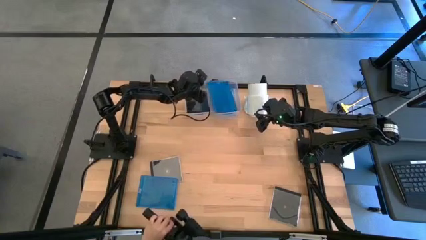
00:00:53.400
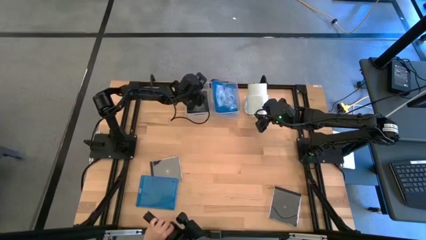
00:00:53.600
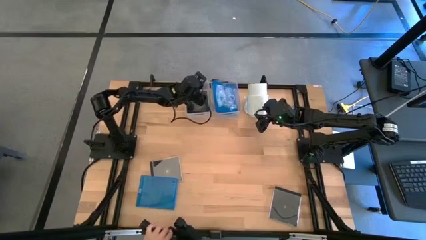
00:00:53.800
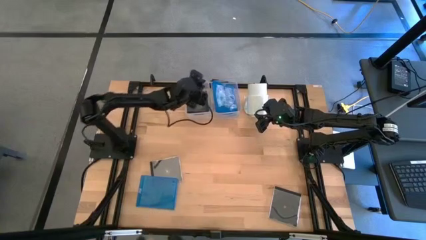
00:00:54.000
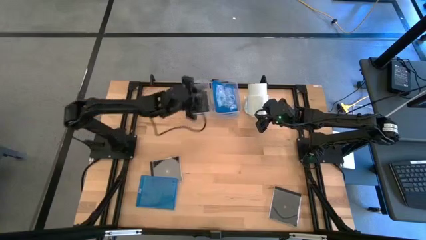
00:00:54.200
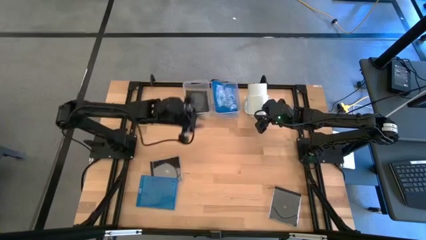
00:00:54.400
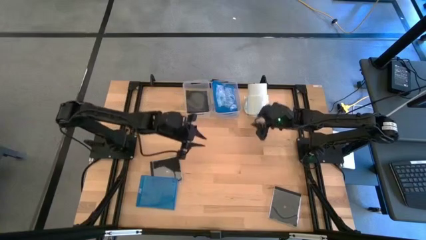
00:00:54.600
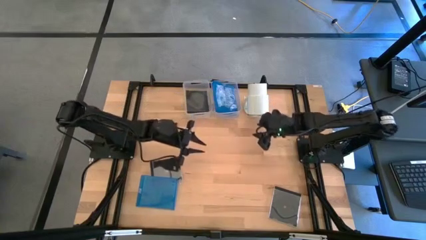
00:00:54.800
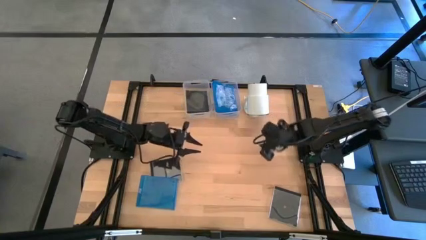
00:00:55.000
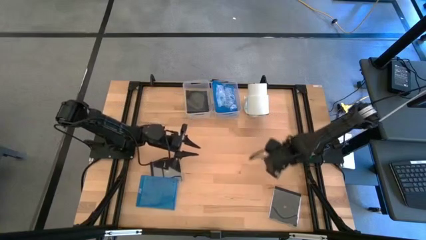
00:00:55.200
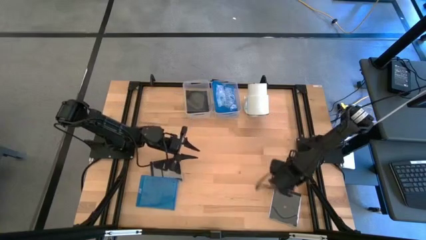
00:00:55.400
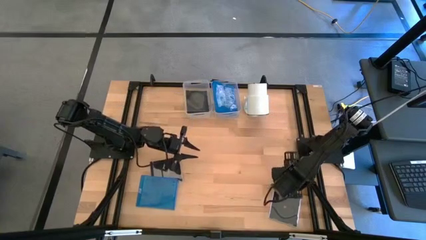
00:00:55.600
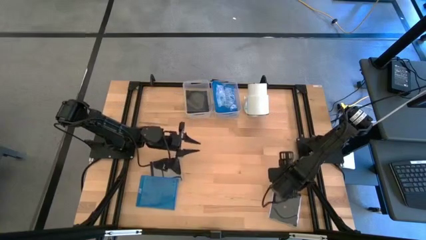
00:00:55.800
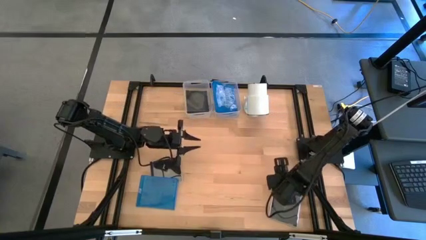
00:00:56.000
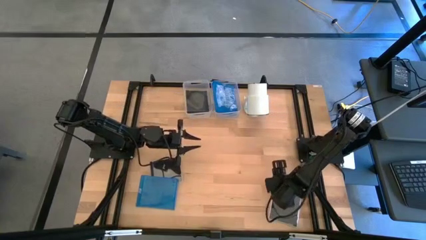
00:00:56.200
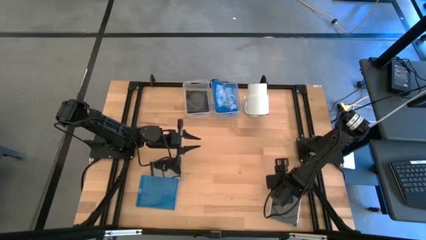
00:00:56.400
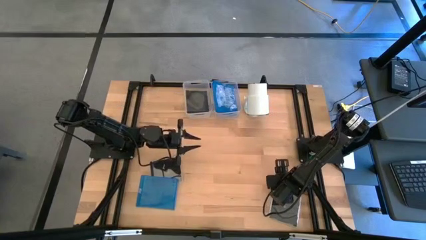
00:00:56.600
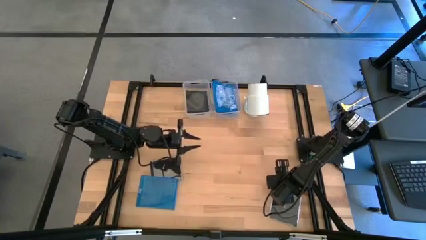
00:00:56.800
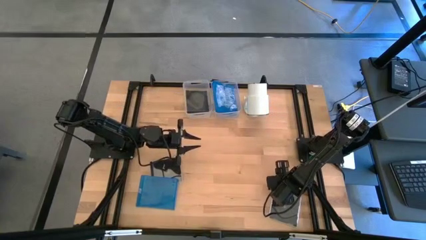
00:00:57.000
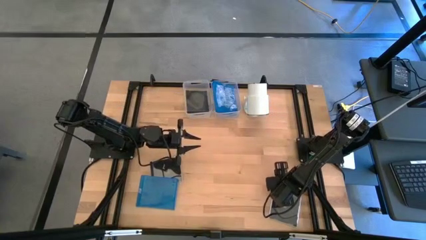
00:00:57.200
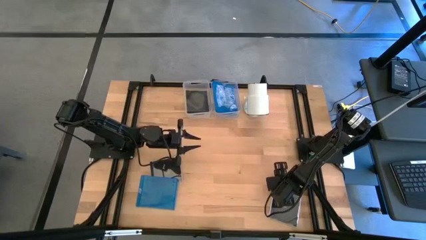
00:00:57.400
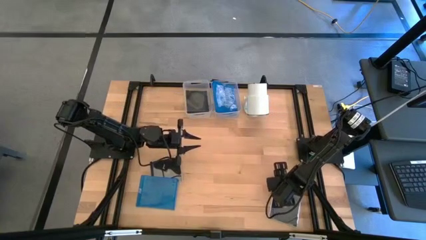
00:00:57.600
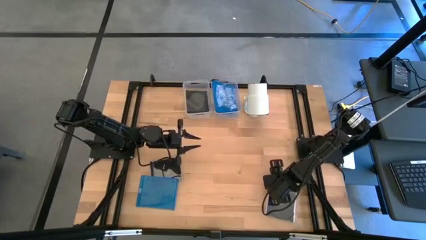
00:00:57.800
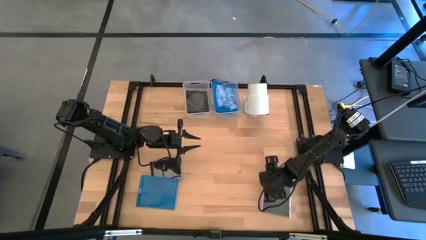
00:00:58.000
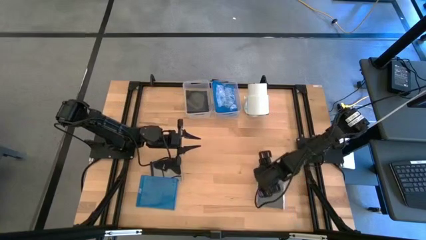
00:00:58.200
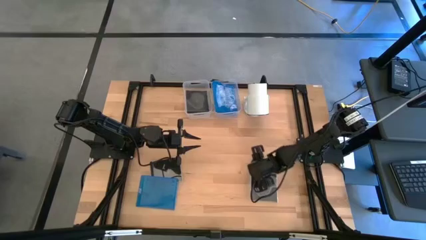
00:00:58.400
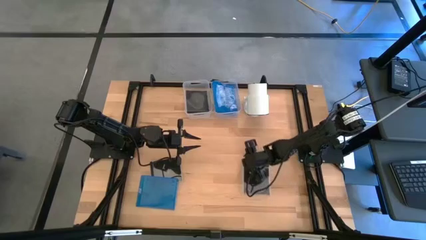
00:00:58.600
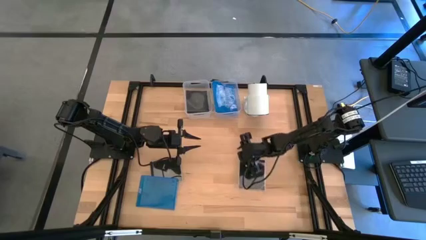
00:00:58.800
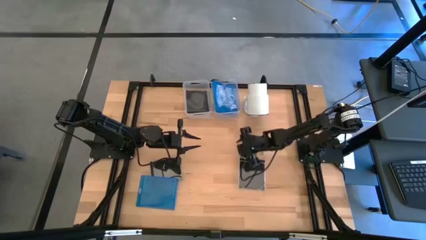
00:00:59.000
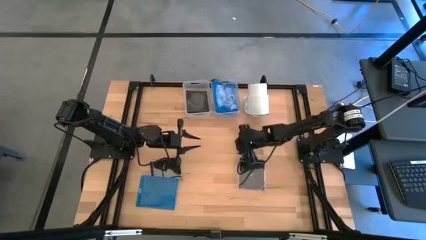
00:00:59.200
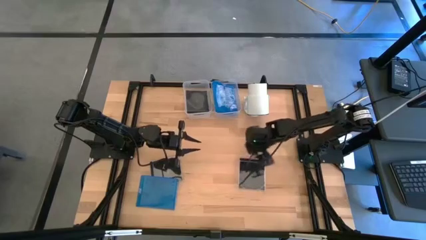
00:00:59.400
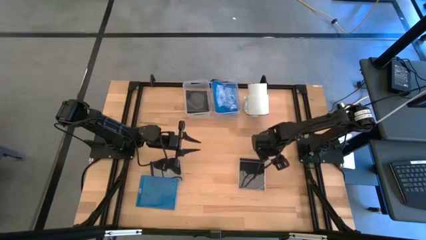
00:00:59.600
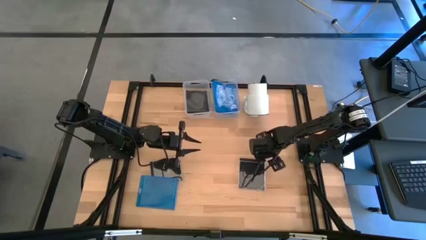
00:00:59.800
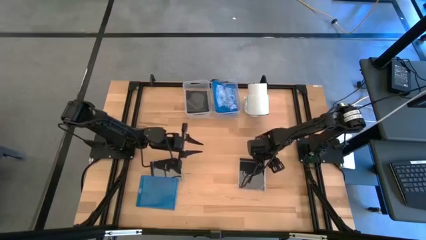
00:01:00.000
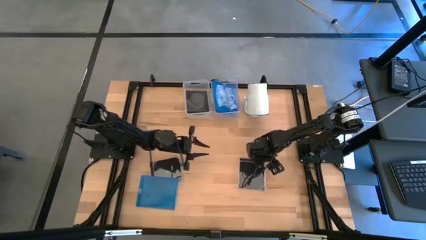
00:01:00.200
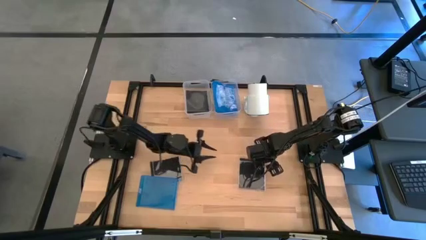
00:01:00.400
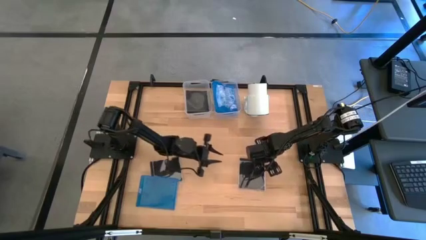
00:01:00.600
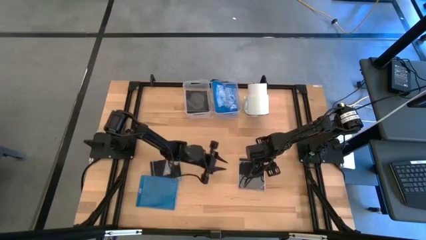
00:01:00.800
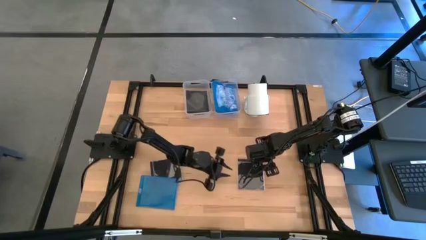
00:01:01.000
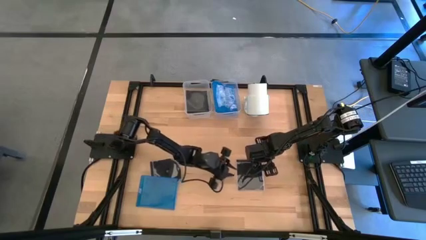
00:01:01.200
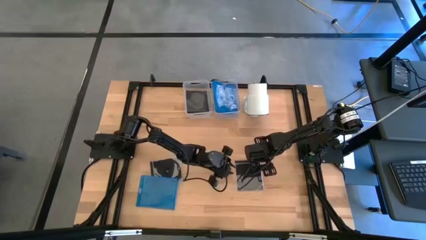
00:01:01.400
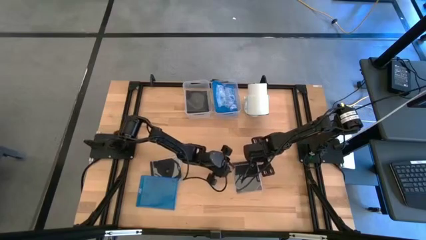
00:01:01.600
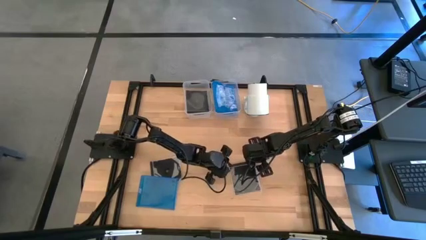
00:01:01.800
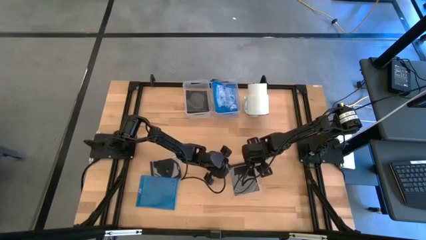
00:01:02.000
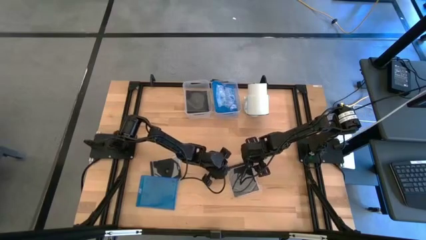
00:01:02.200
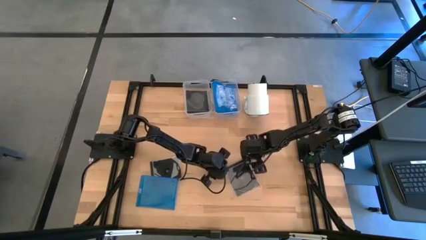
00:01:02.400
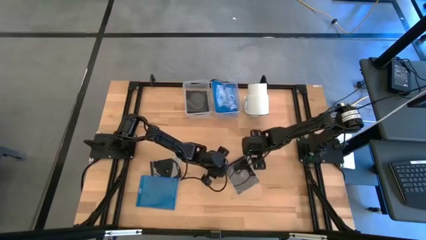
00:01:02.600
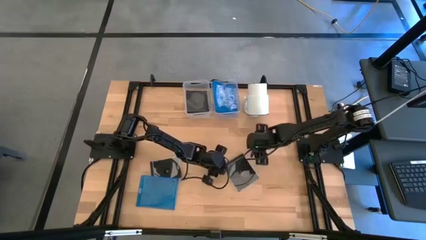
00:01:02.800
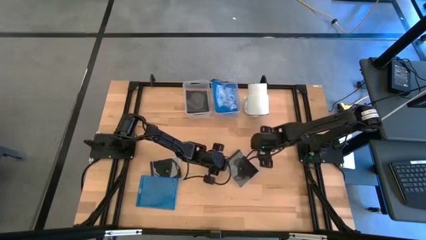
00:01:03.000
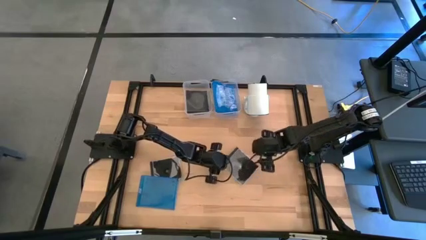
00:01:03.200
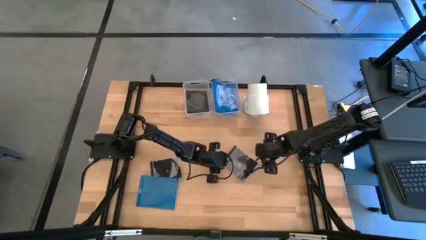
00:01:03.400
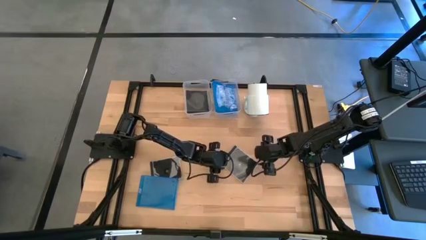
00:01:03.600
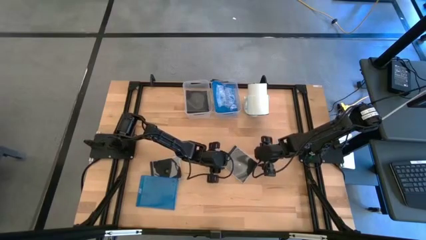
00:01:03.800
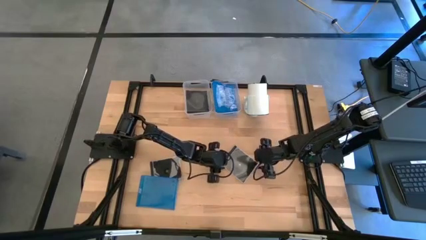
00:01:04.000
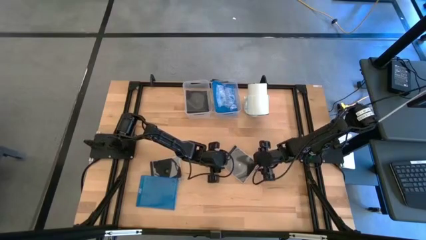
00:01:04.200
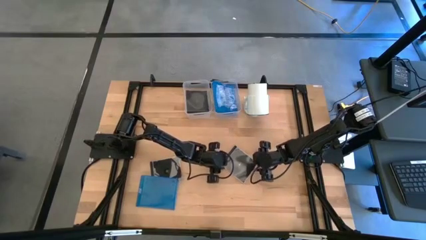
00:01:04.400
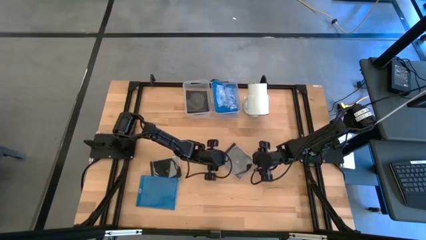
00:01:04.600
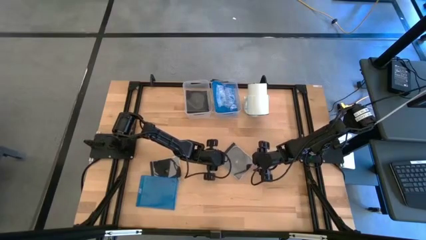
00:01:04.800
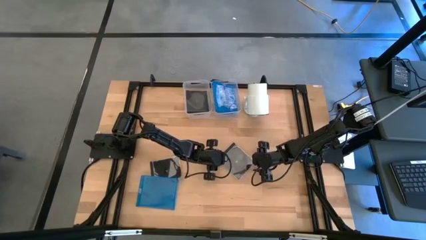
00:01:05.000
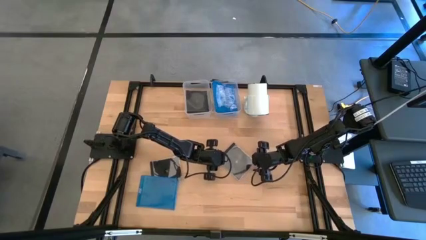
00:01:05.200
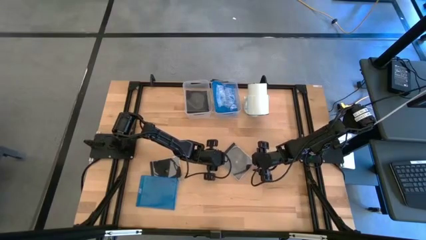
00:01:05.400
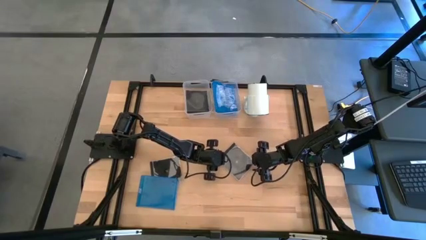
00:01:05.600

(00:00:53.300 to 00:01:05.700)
Task: Pick & place jewel cases by type
Put the right black CD Case into the left transparent bin

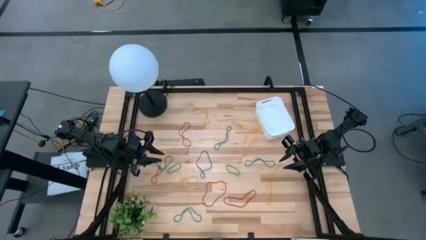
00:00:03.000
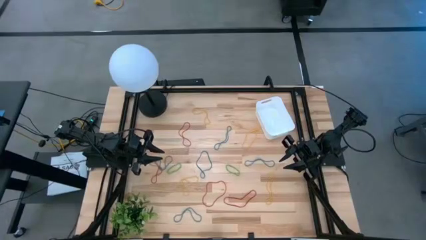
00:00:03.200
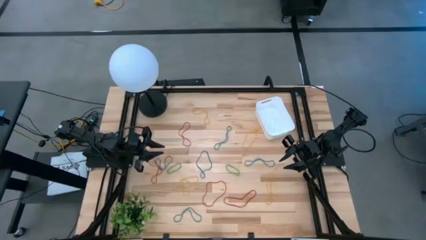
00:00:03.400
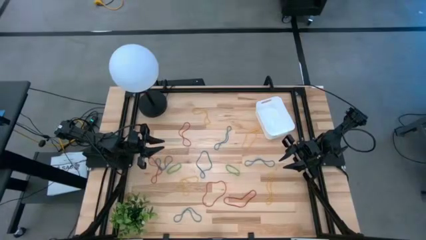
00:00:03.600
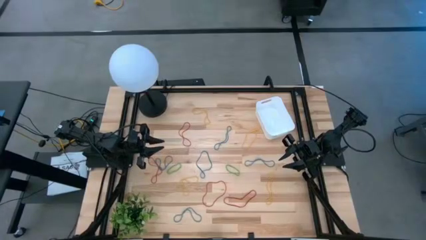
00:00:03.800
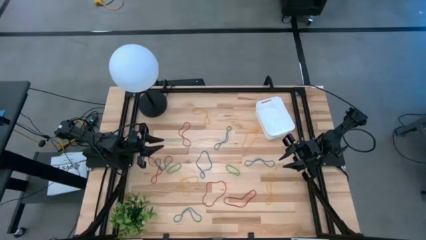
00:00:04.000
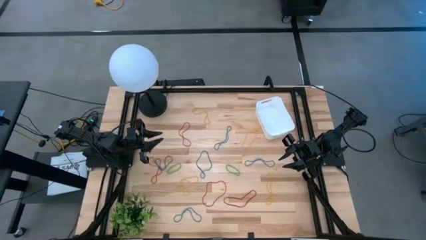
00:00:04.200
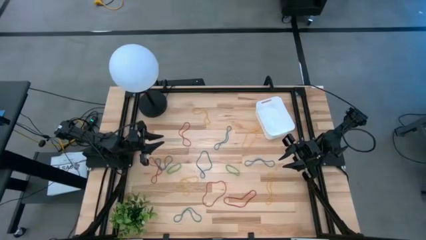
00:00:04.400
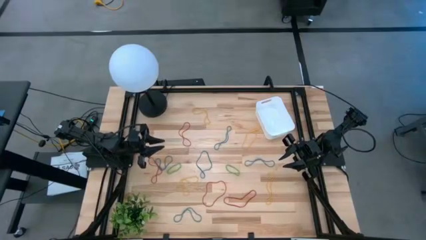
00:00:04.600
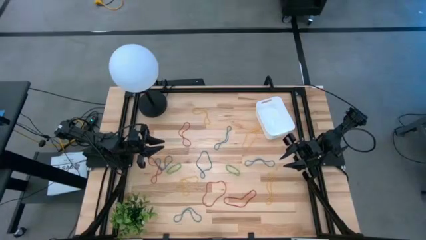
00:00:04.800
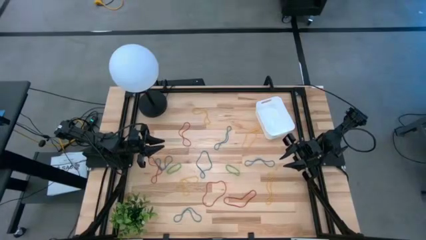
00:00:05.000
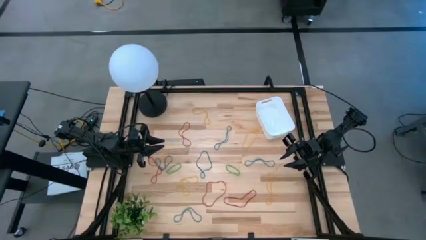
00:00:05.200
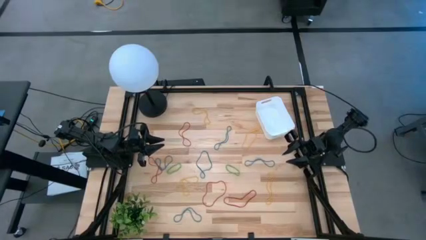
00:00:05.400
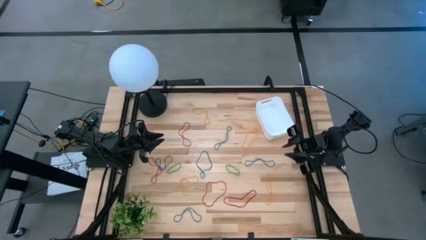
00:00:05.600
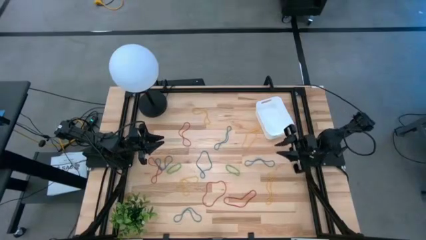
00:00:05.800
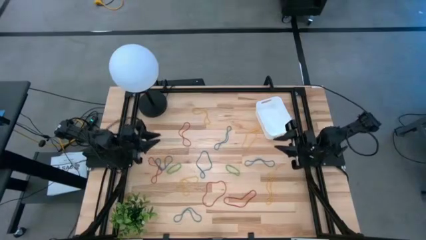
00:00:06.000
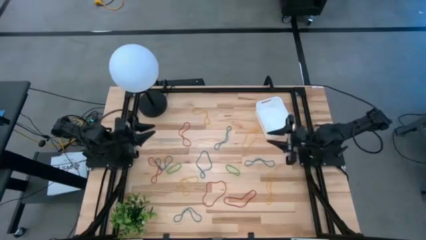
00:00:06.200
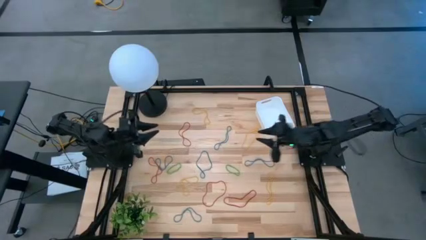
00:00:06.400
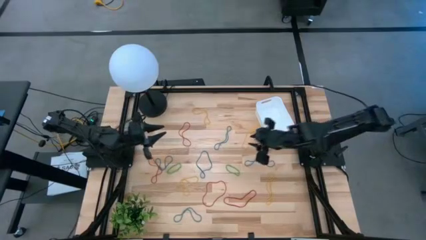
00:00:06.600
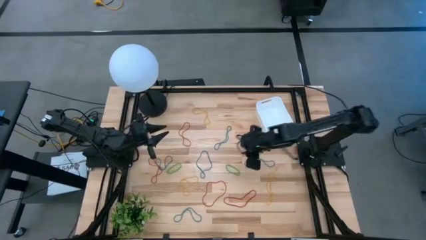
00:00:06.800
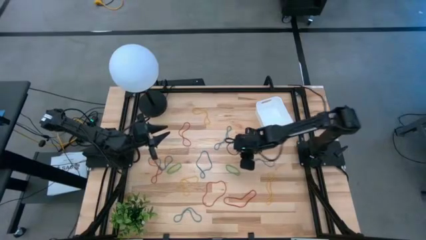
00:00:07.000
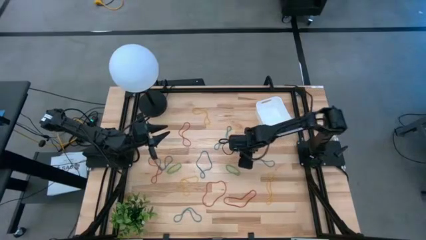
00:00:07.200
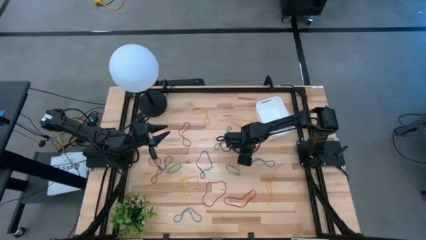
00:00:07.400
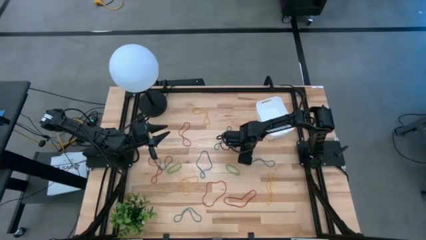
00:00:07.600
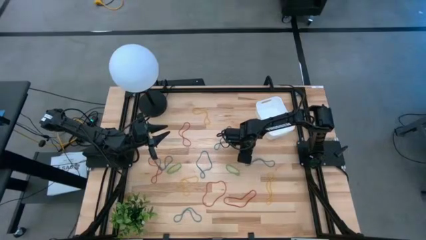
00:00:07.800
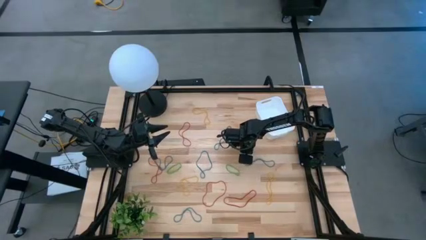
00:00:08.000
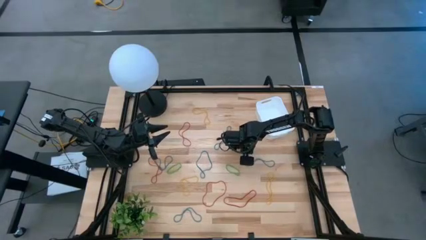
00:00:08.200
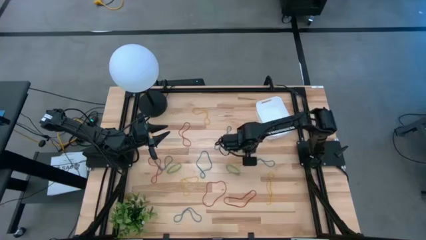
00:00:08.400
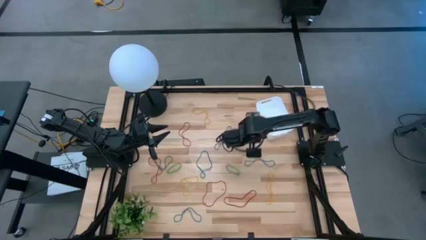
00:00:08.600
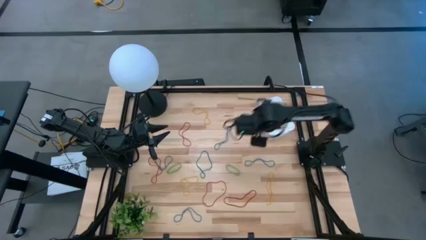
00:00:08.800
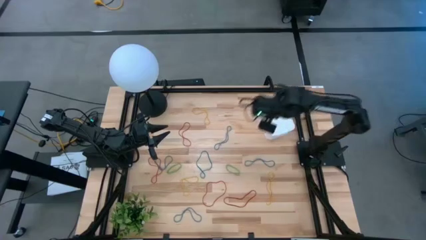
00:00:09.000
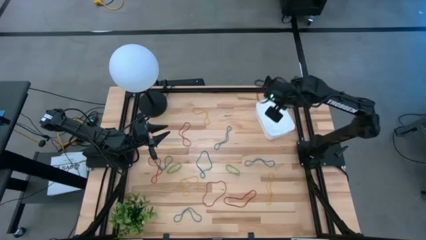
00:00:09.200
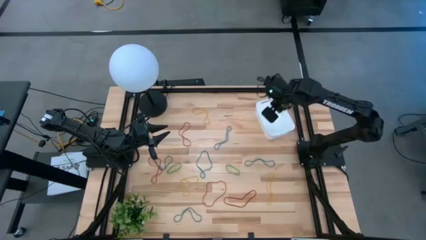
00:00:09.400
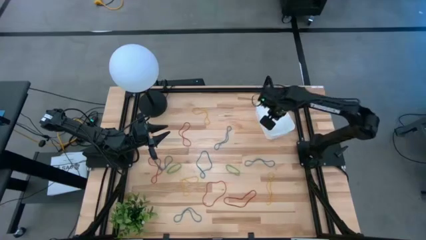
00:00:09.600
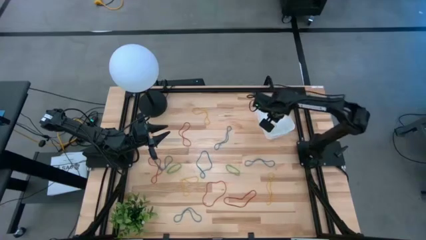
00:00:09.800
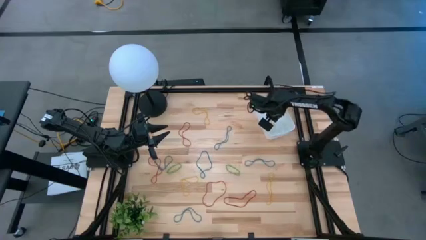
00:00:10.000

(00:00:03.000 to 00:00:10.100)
Task: Pick and place items into bin
Put the yellow rubber band into the white bin
